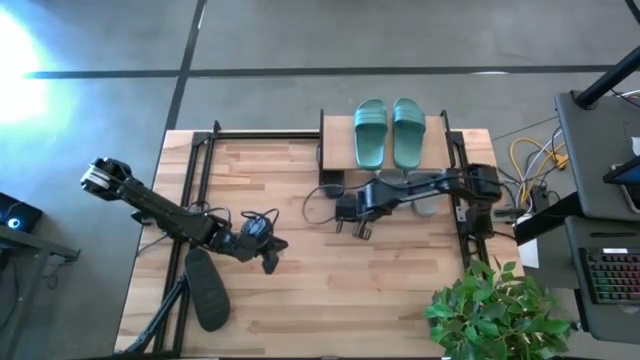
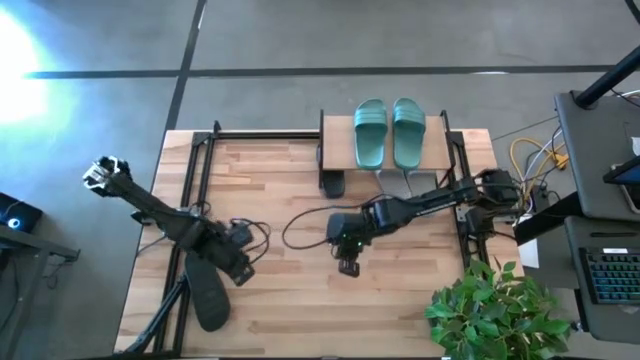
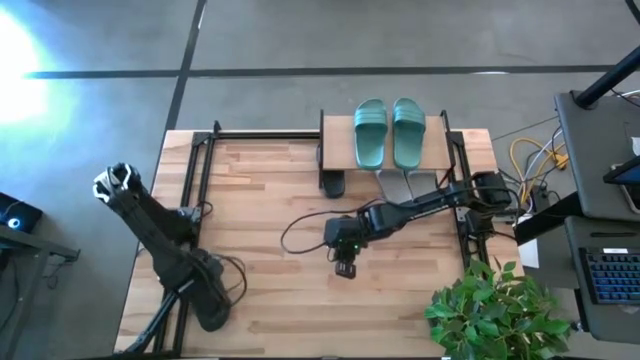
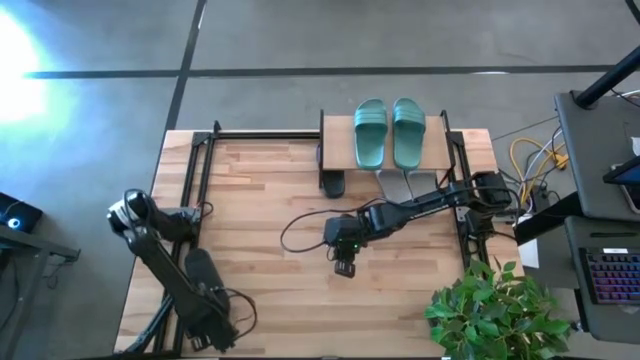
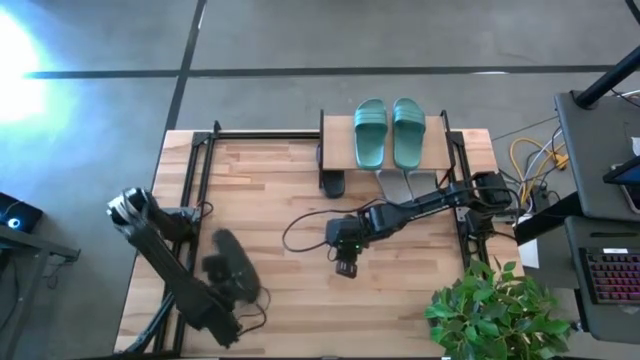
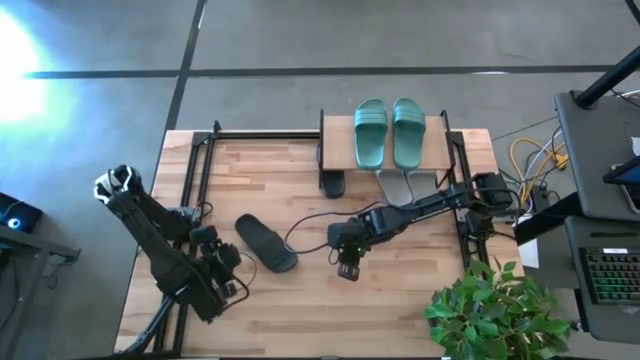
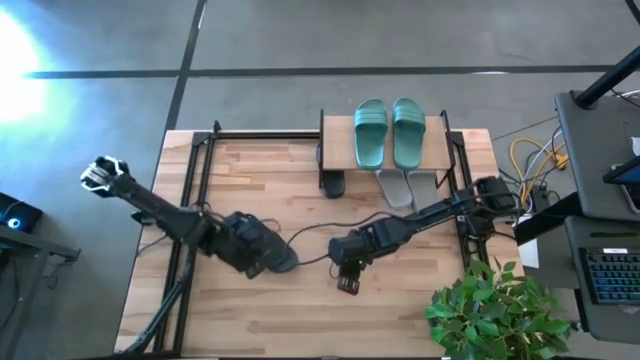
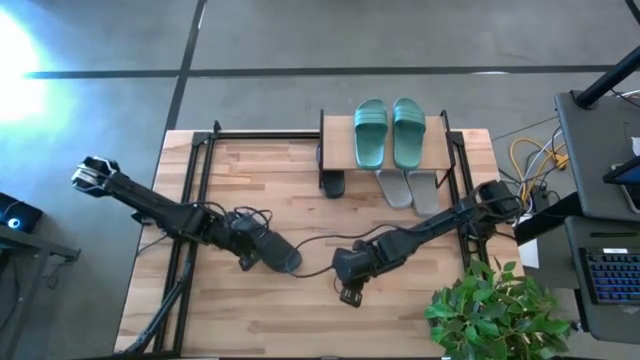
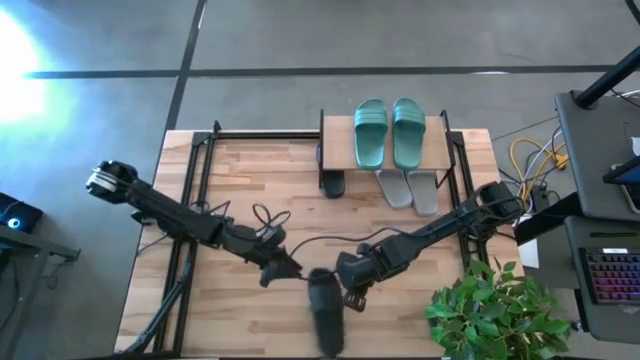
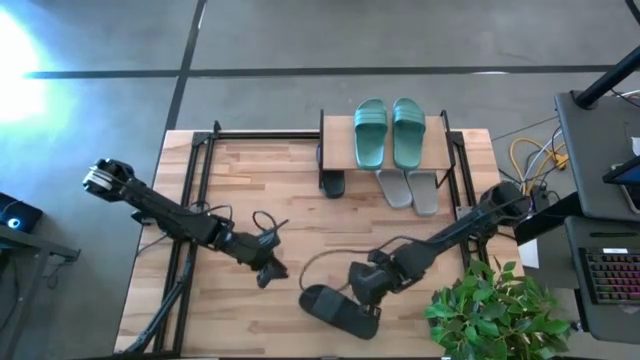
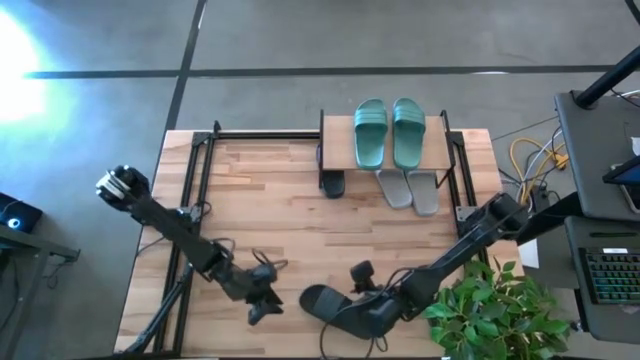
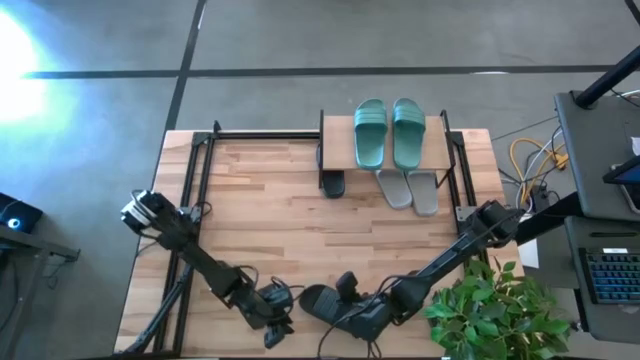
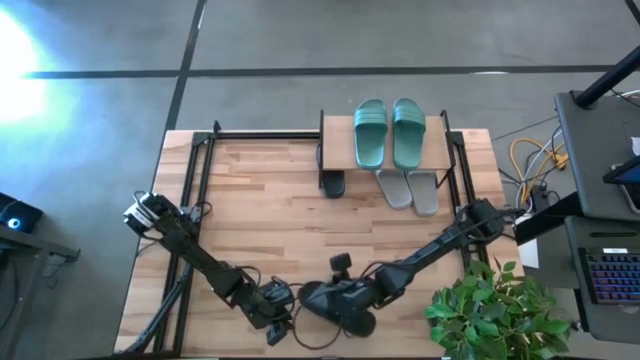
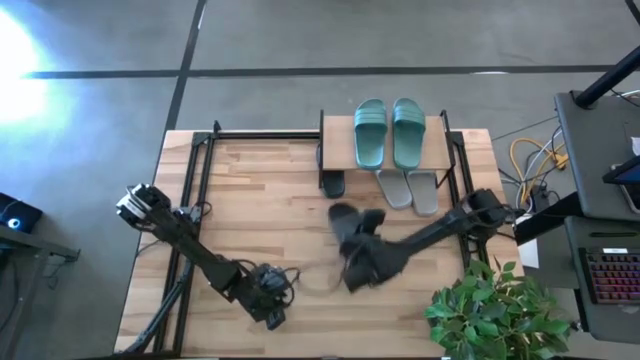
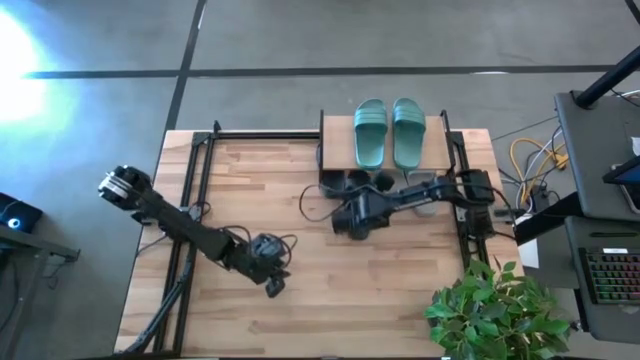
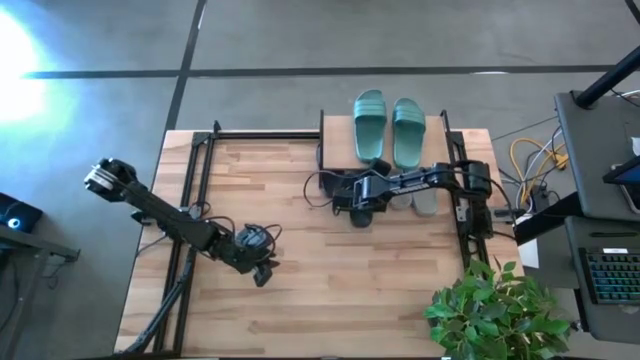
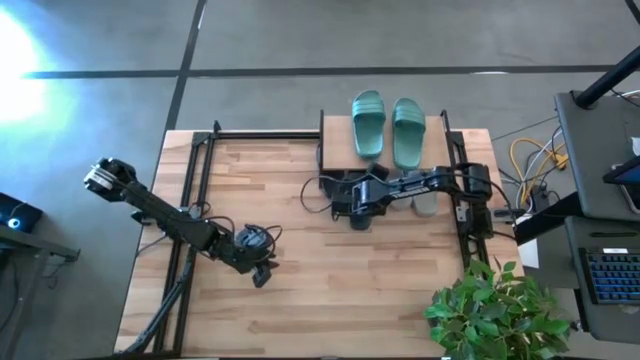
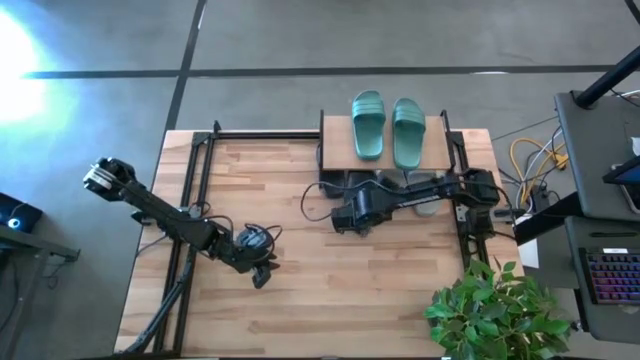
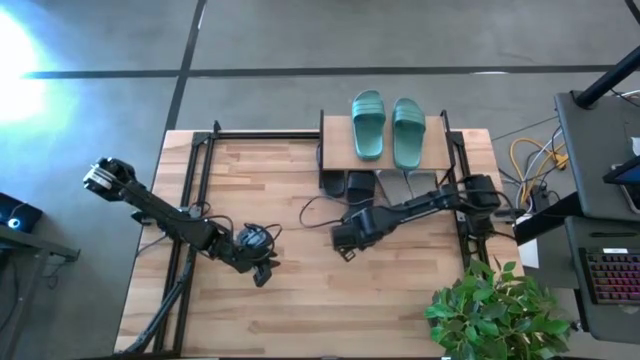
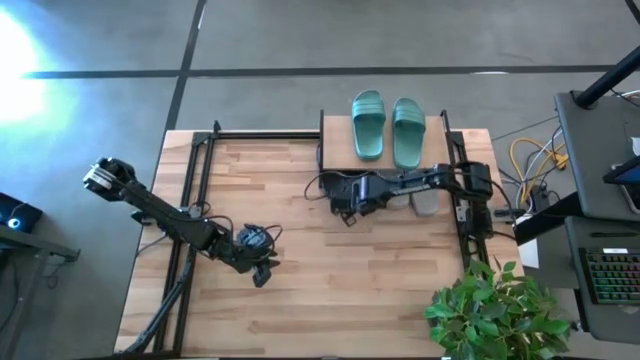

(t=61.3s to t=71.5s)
Task: Pick and place slides into the shelf
Put the black slipper under the shelf

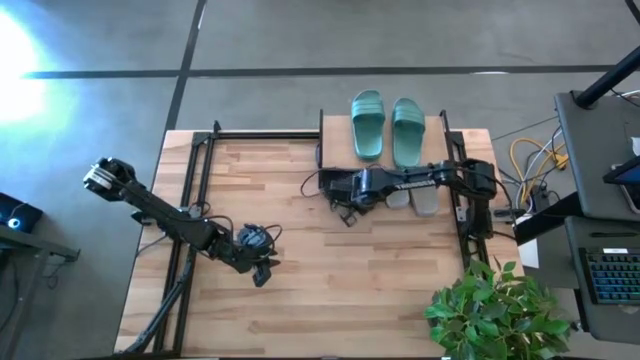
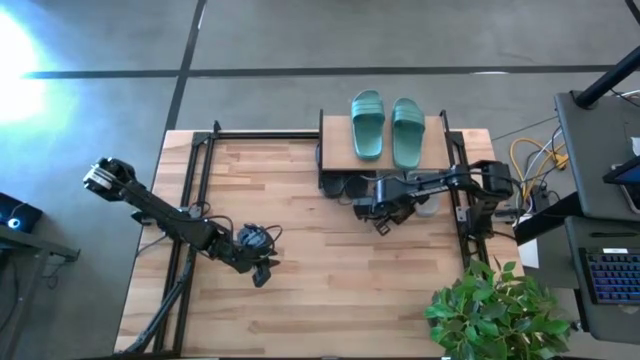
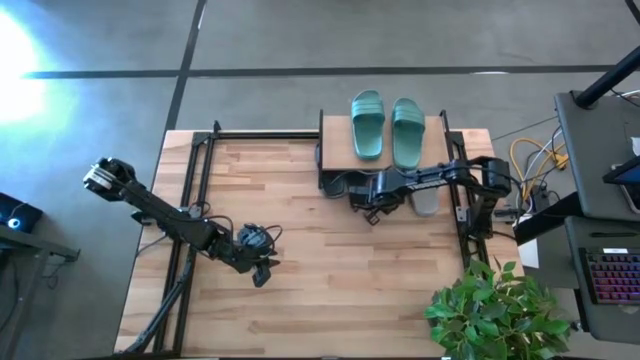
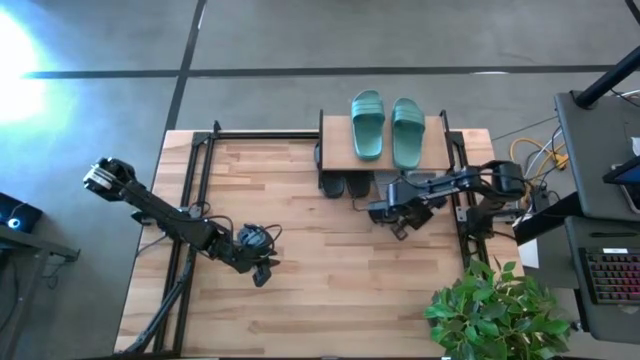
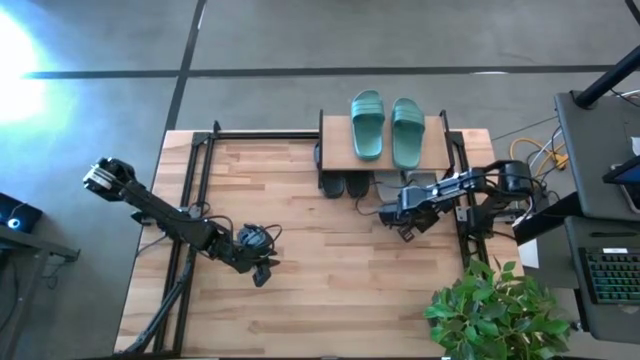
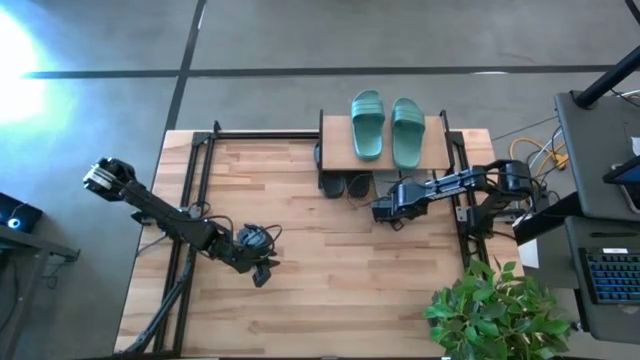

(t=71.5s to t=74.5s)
Adjust the gray slippers under the shelf

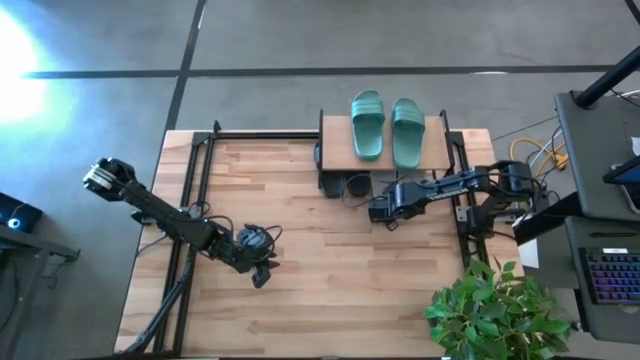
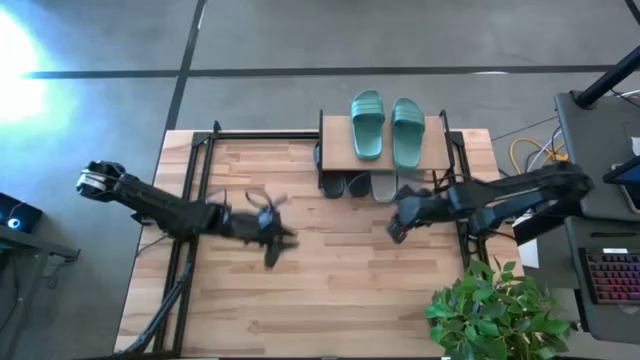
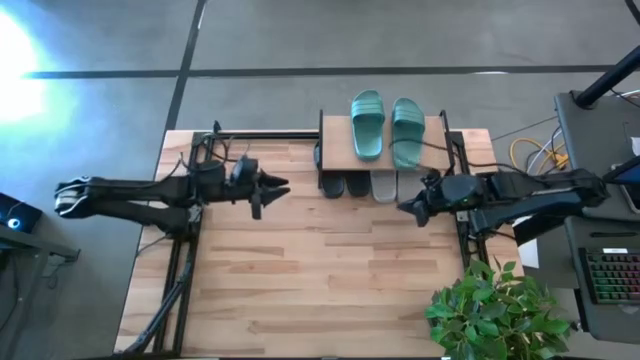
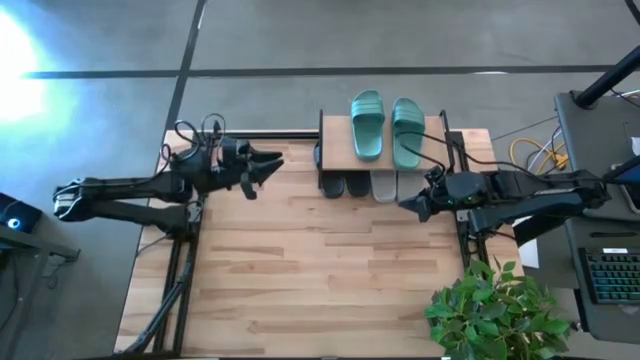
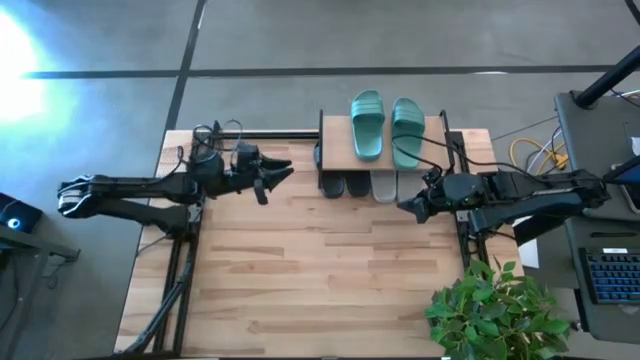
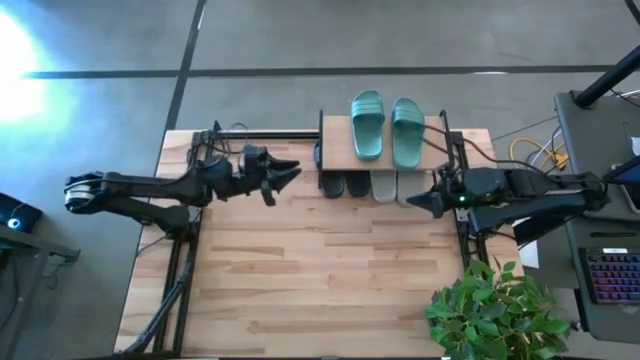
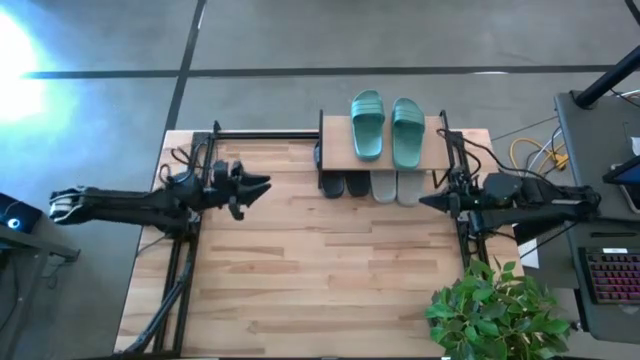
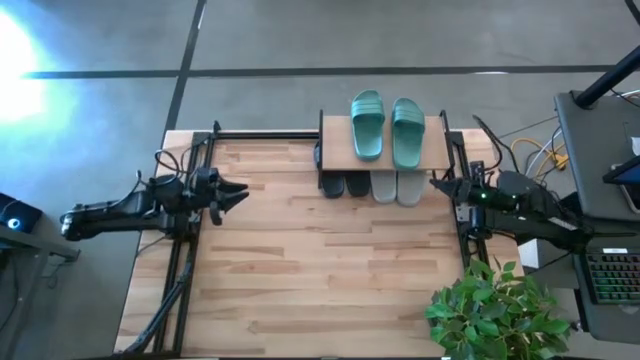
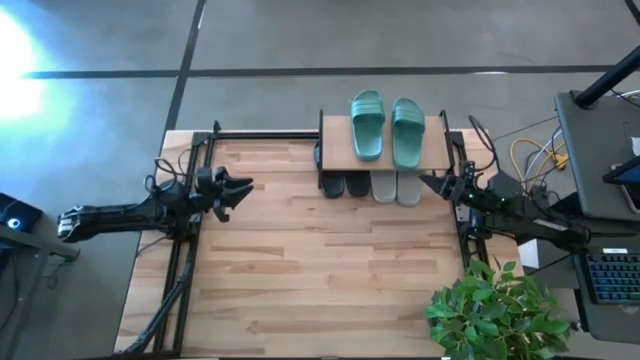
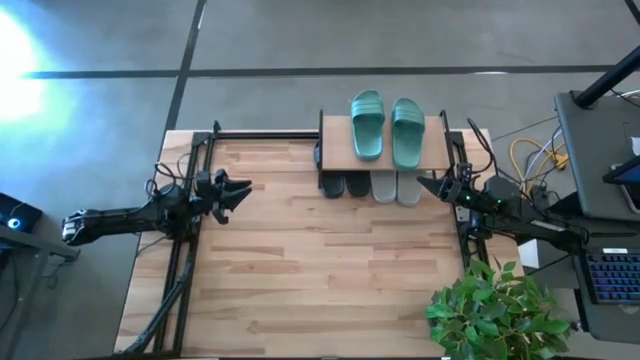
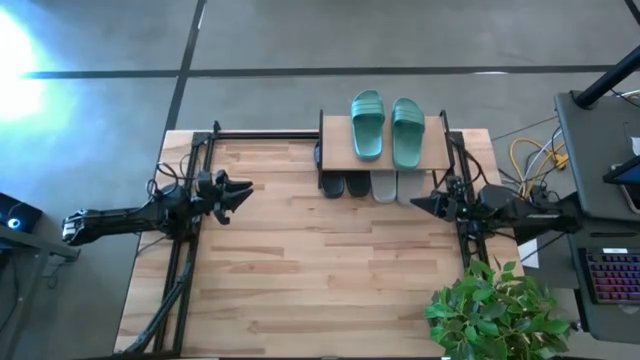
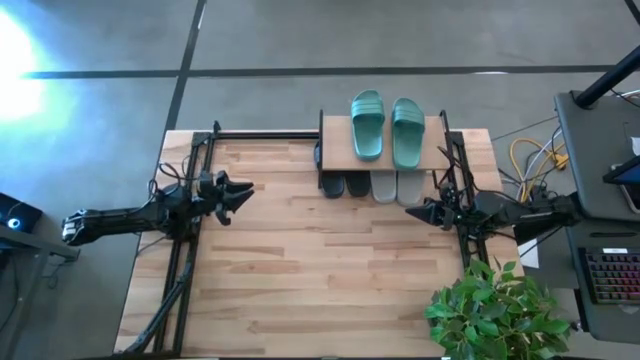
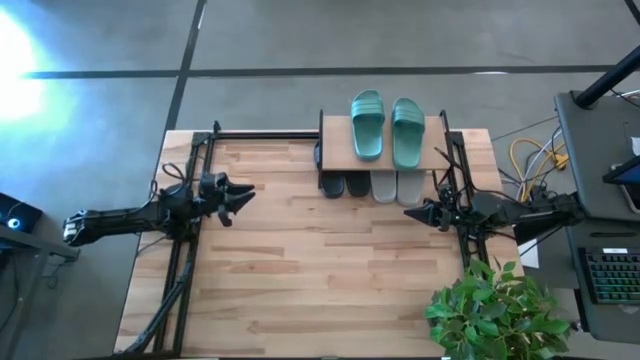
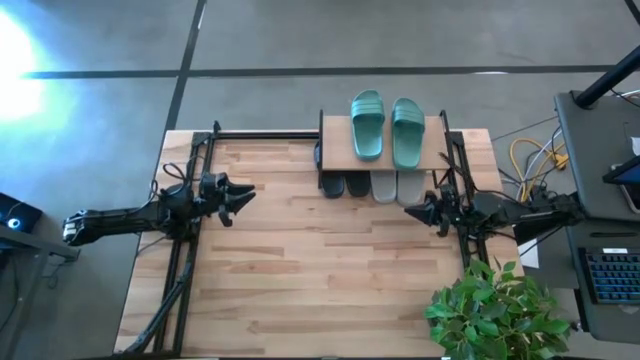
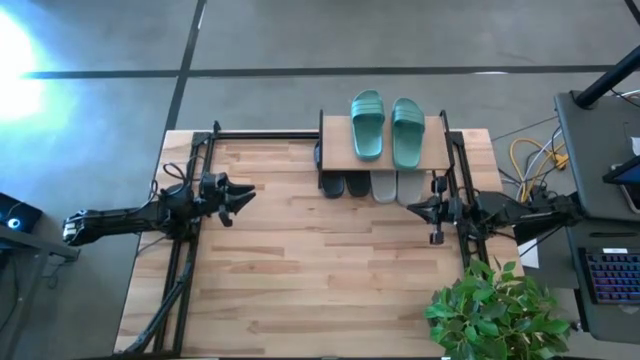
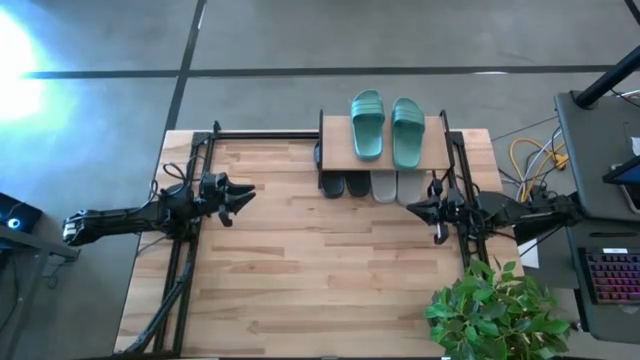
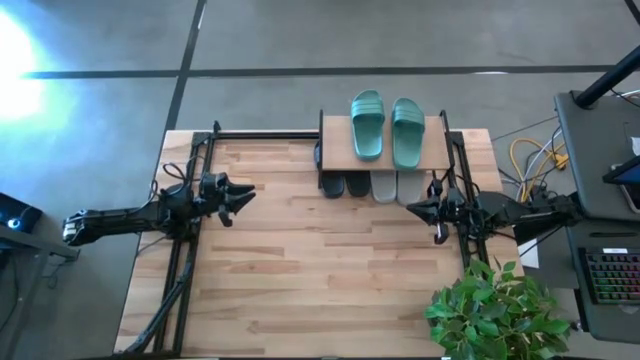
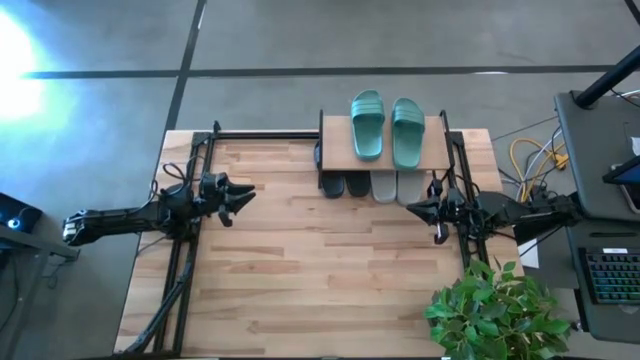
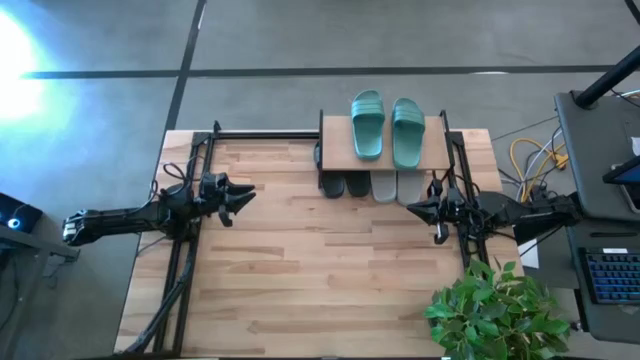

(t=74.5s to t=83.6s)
Return to Home Position
